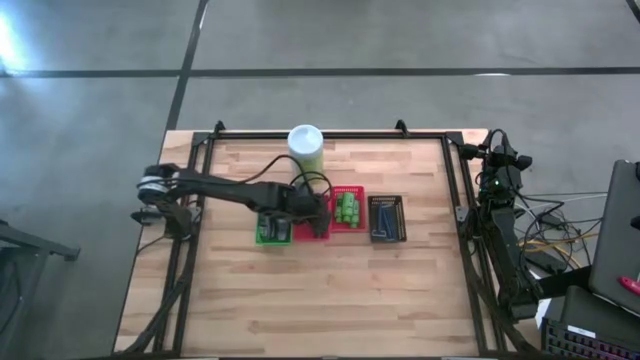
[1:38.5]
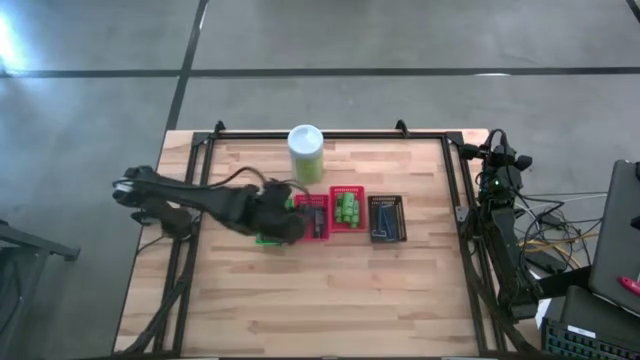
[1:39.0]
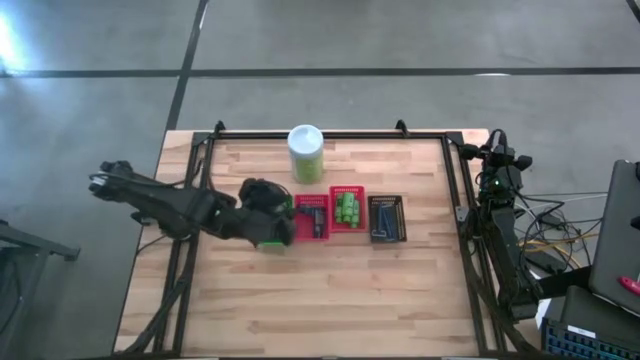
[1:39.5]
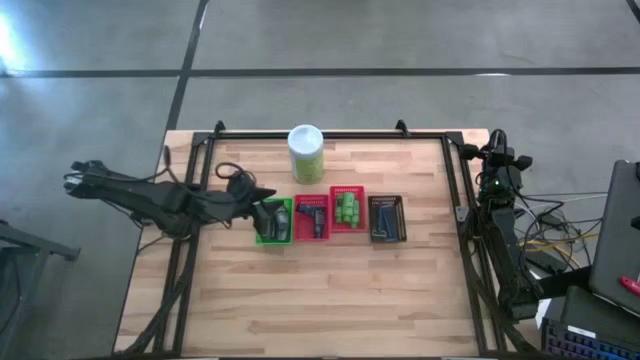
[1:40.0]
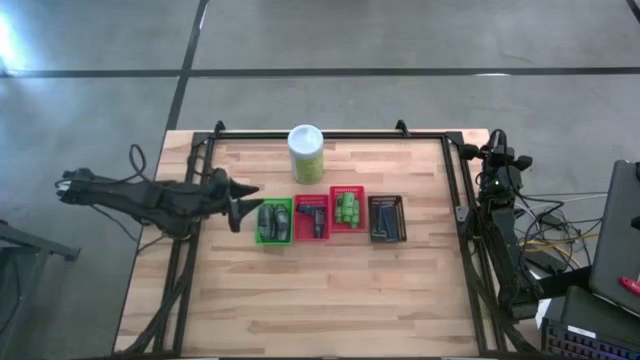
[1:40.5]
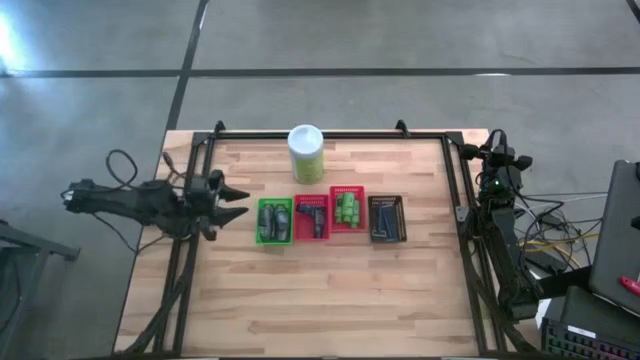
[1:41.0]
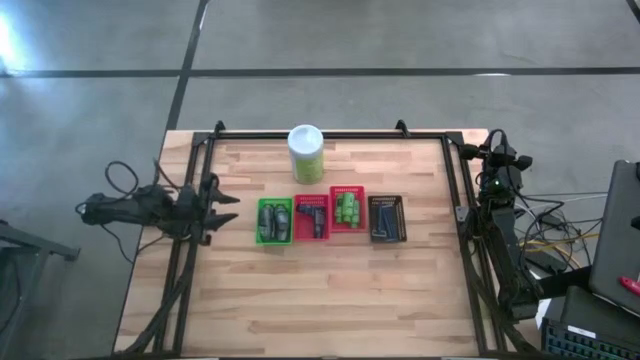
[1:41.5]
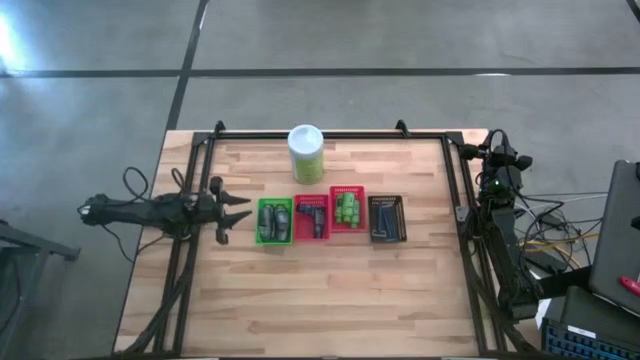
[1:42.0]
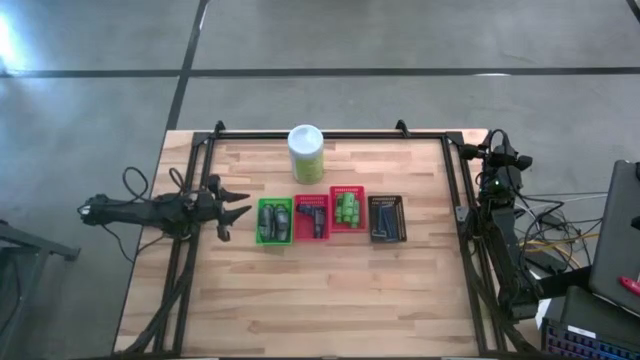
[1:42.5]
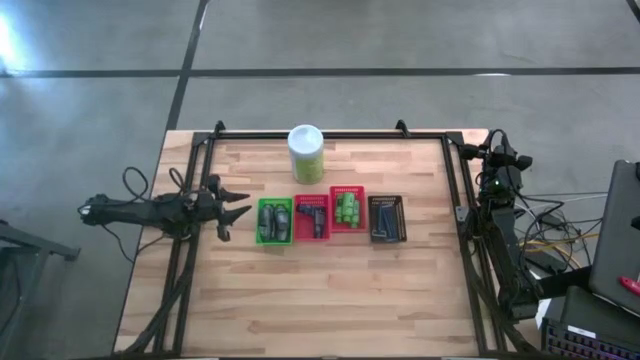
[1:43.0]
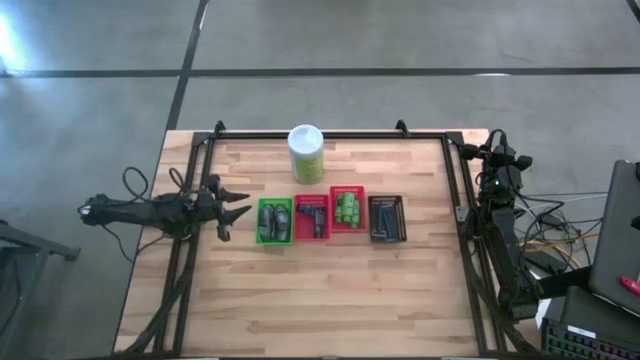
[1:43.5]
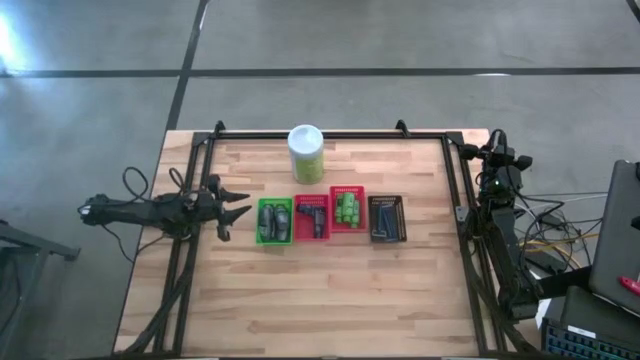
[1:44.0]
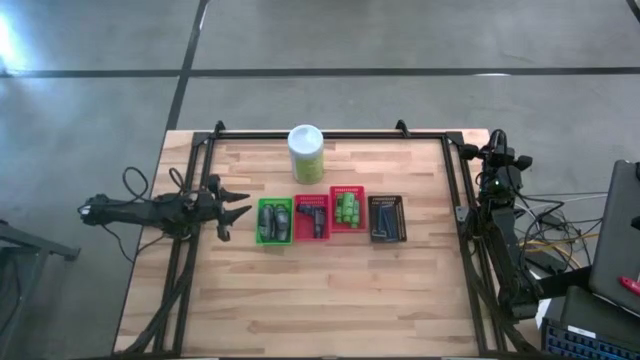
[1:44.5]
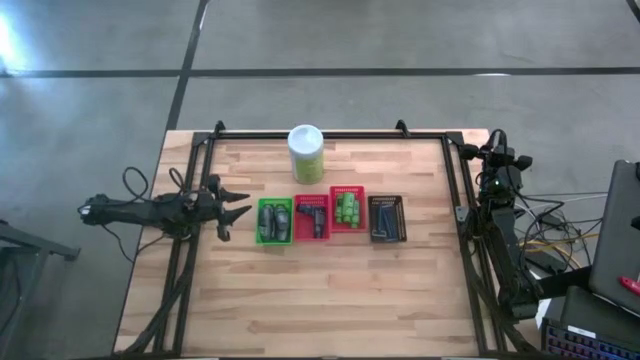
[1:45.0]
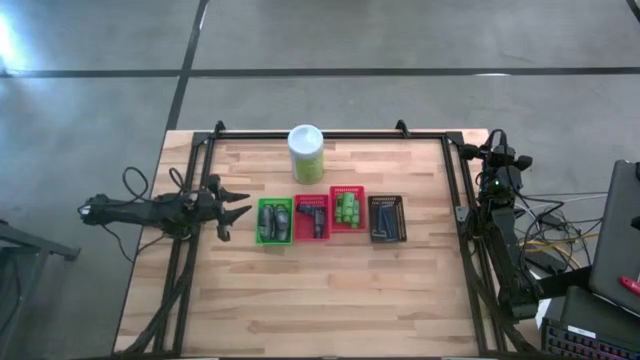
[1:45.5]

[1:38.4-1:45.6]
Task: Pick & Place Travel size toiletries
Return to Home Position

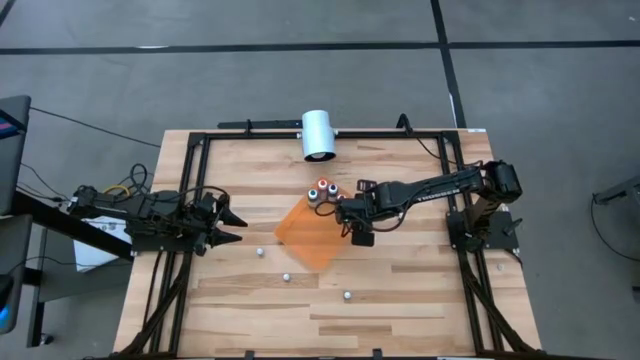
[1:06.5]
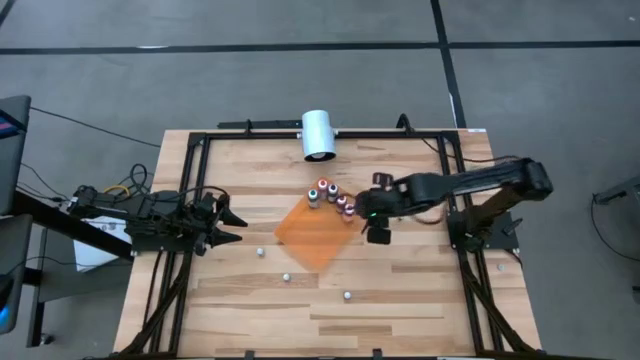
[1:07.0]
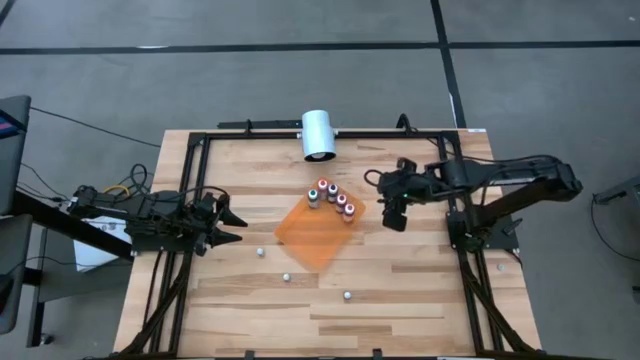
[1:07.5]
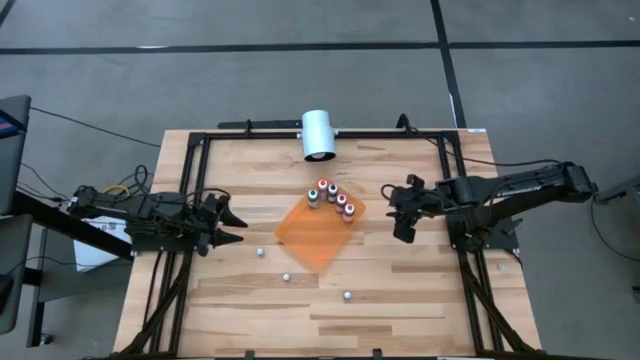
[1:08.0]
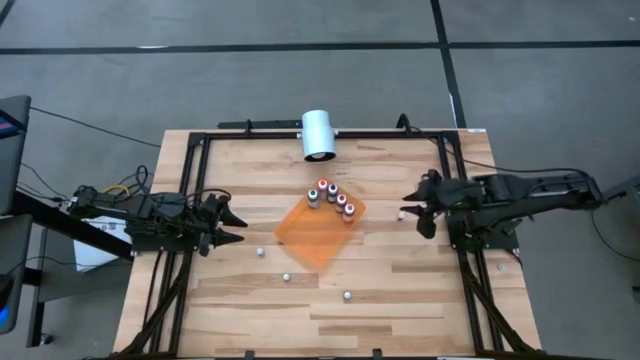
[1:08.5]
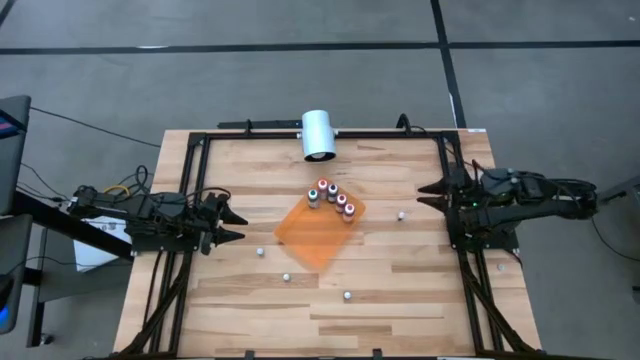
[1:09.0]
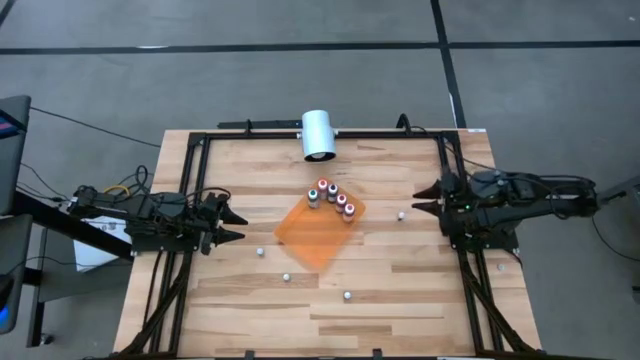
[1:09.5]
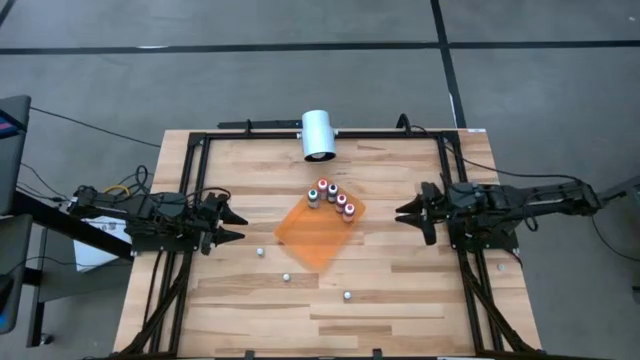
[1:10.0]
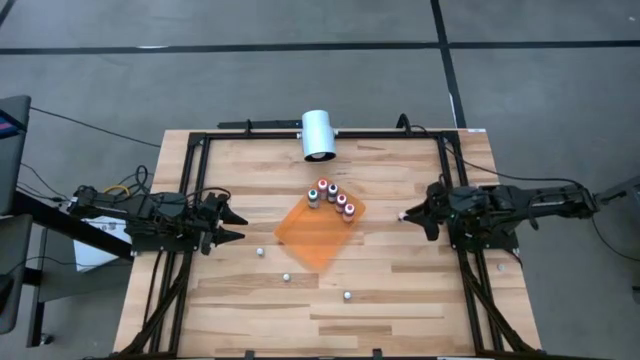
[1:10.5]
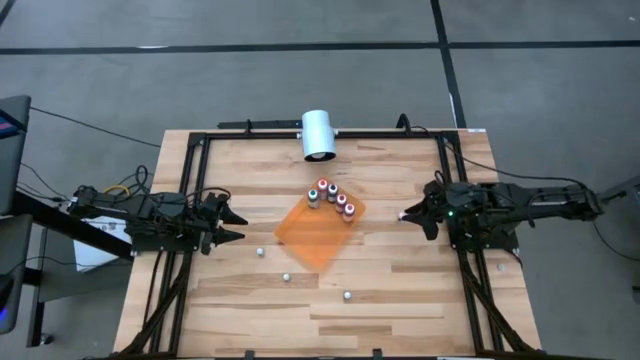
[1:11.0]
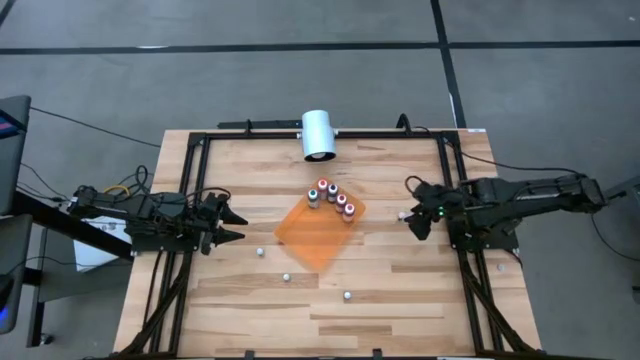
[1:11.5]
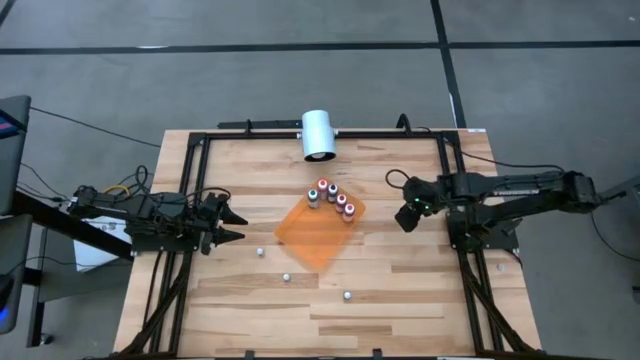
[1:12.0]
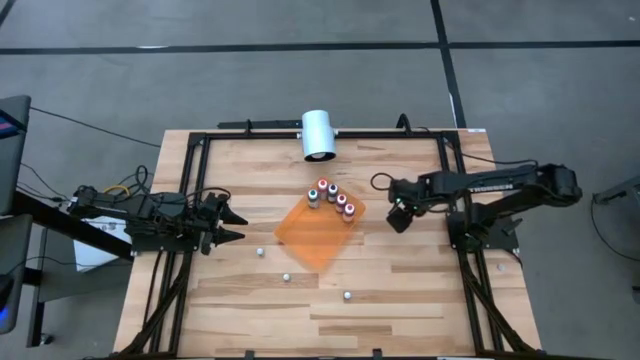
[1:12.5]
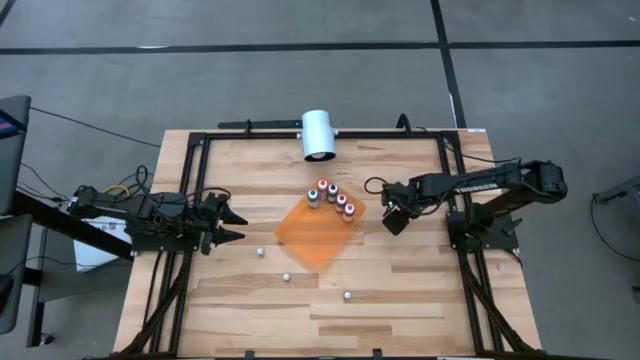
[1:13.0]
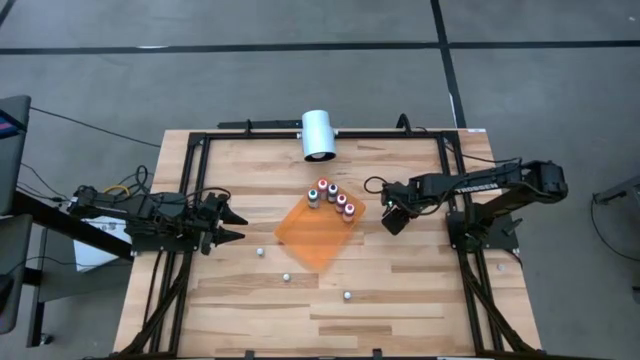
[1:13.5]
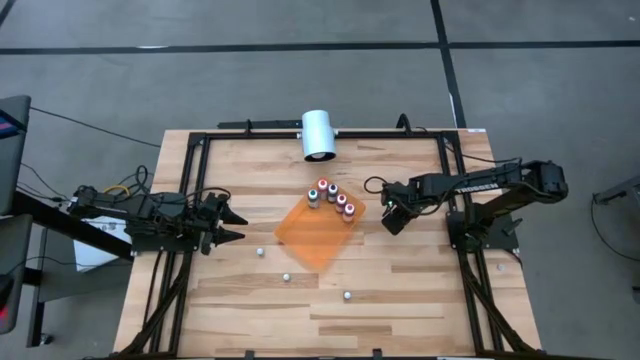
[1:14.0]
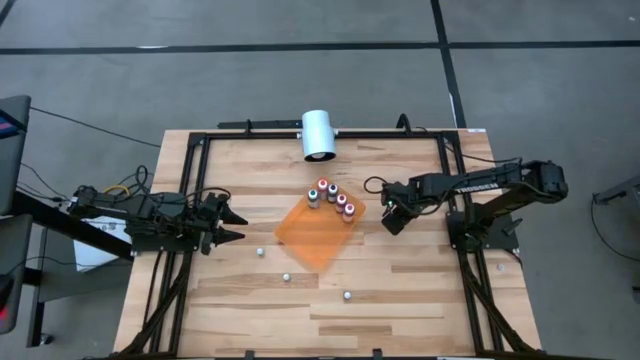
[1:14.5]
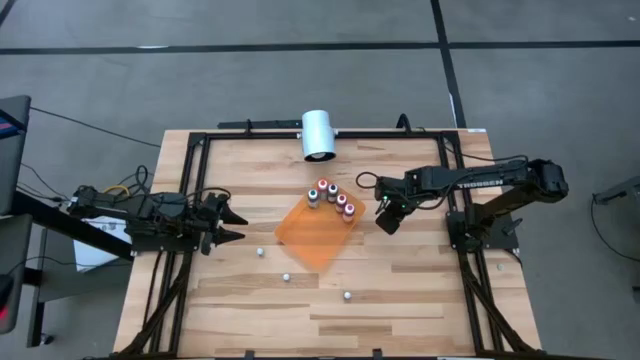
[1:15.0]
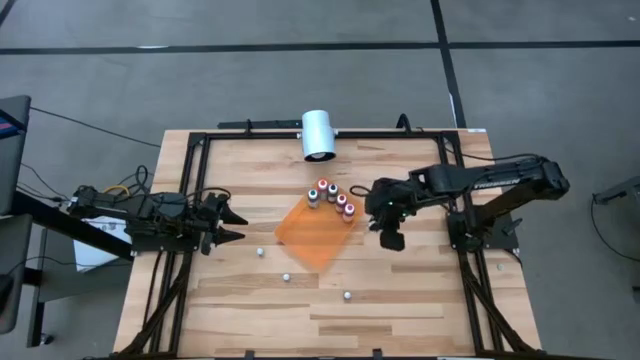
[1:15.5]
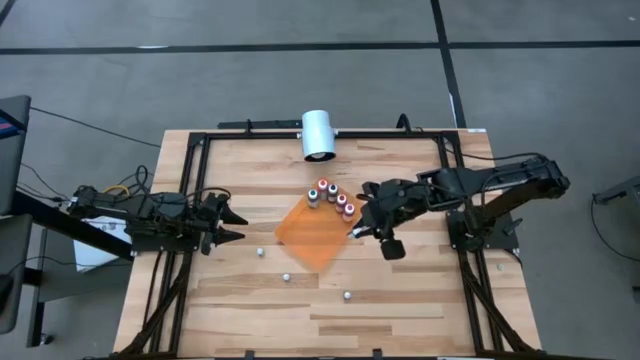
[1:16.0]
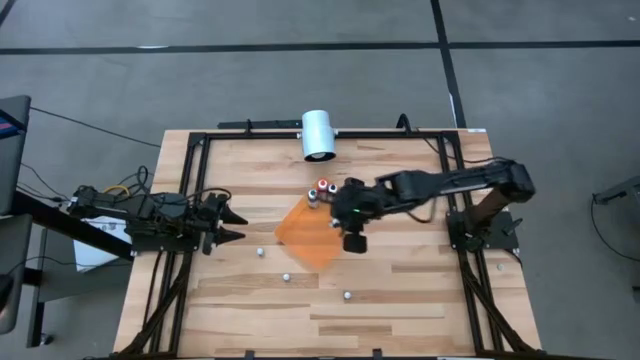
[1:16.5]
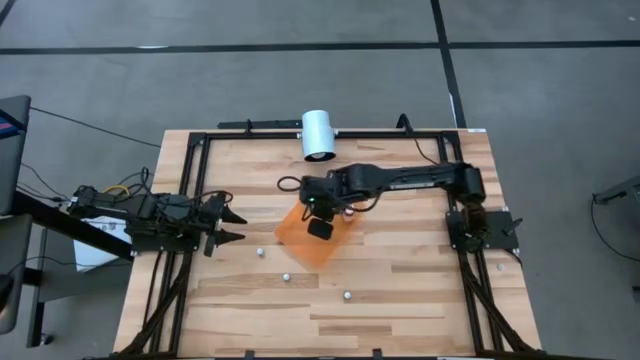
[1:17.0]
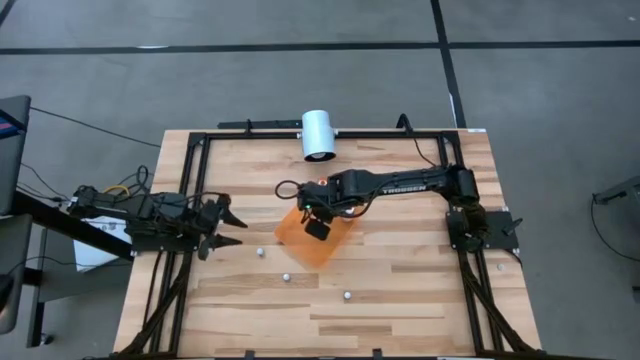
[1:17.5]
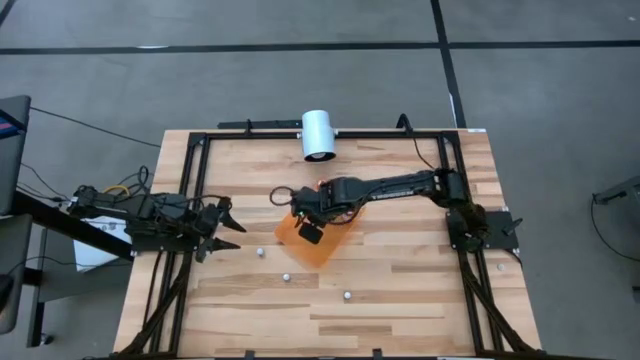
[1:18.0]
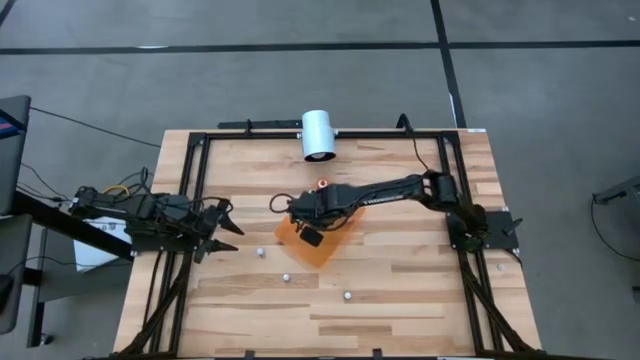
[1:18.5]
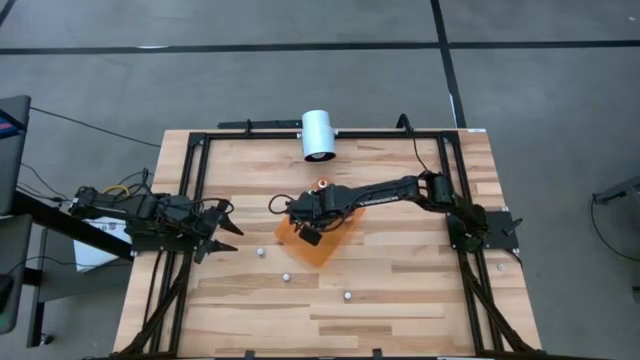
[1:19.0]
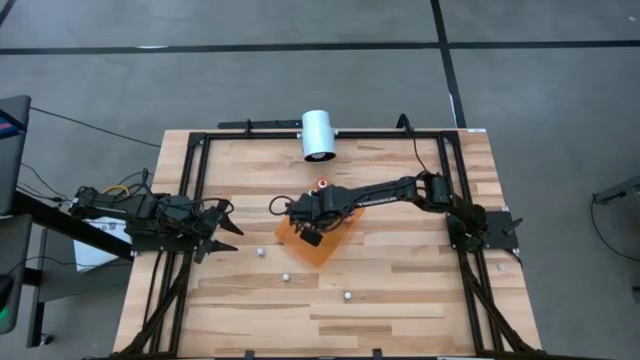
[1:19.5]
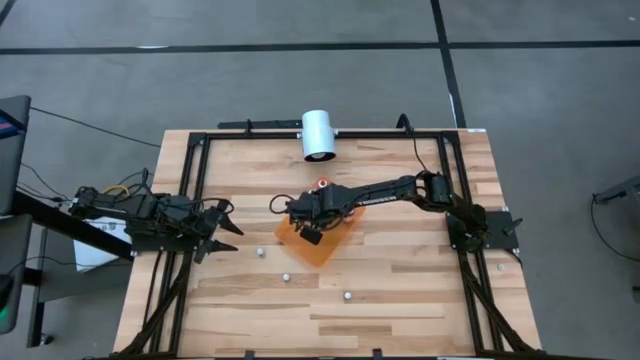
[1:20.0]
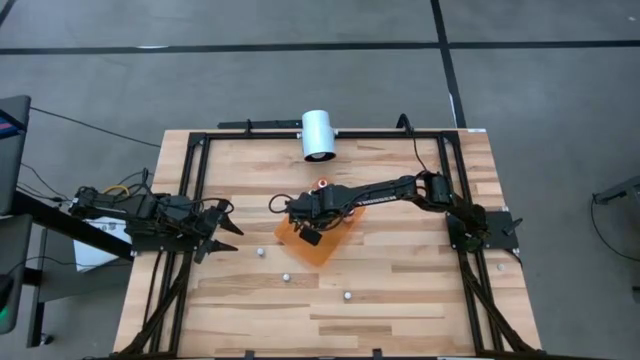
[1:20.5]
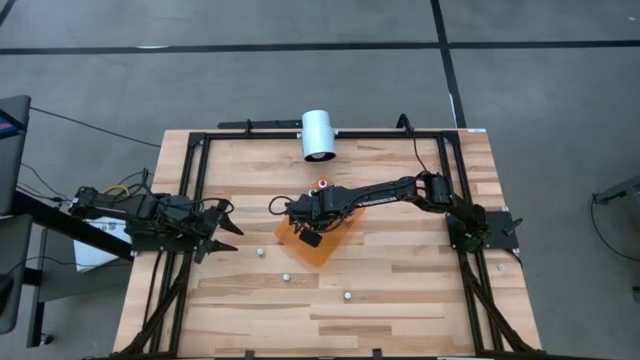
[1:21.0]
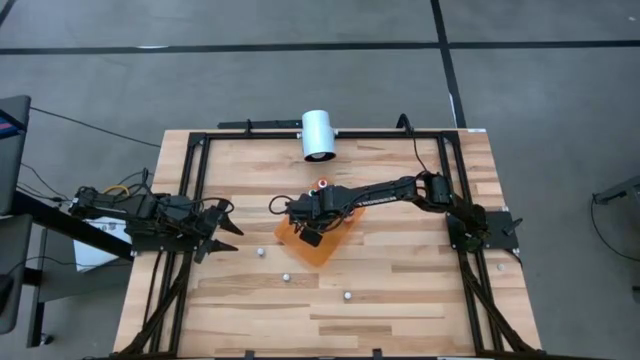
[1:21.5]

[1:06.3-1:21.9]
Task: Pick & Place food coloring
Put the small brown food coloring bottle into the orange bin
